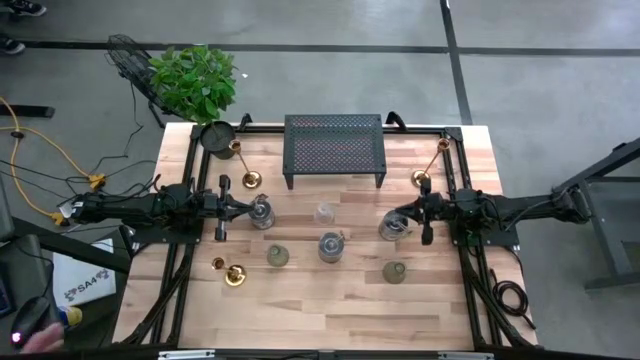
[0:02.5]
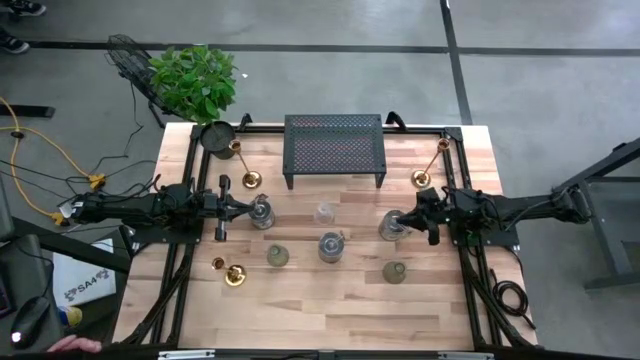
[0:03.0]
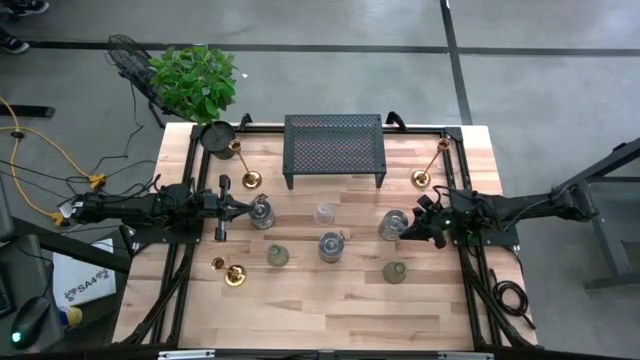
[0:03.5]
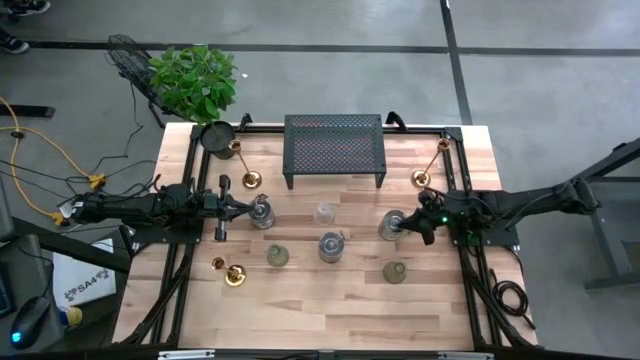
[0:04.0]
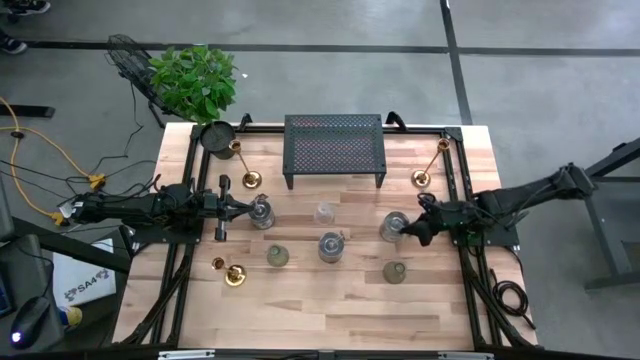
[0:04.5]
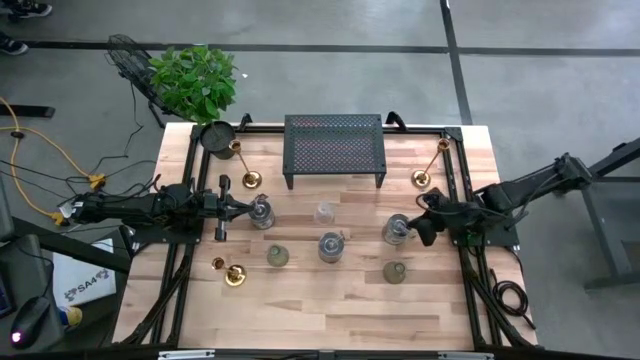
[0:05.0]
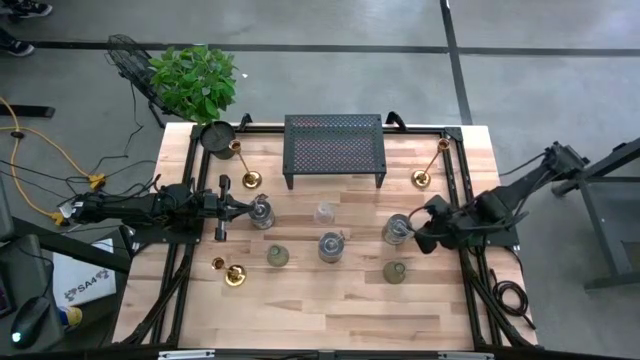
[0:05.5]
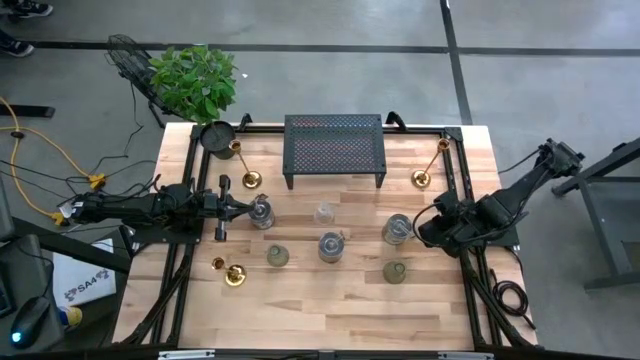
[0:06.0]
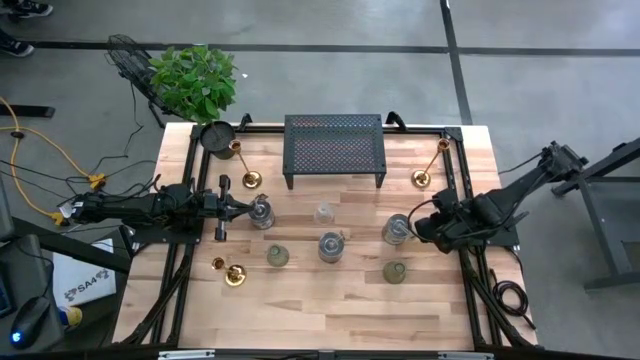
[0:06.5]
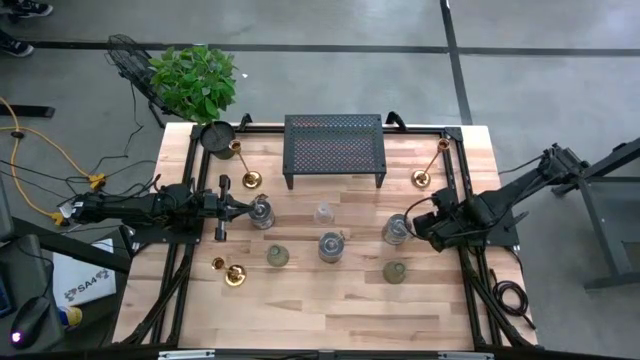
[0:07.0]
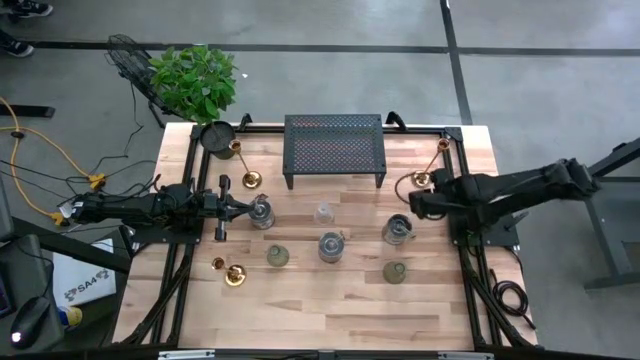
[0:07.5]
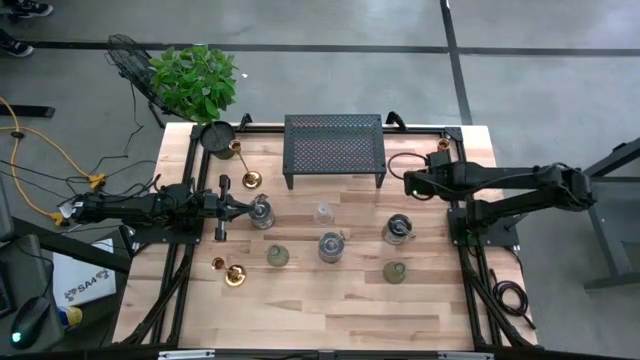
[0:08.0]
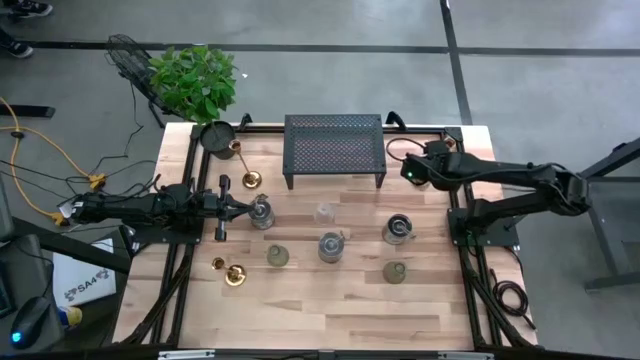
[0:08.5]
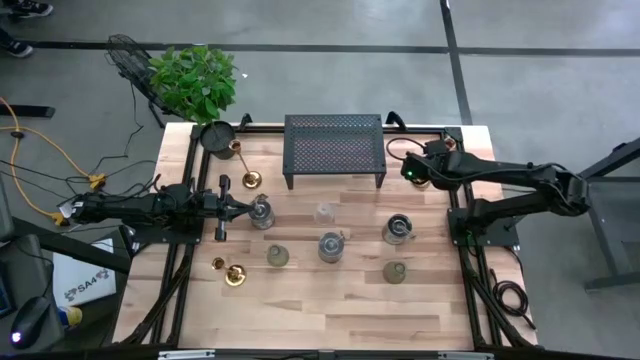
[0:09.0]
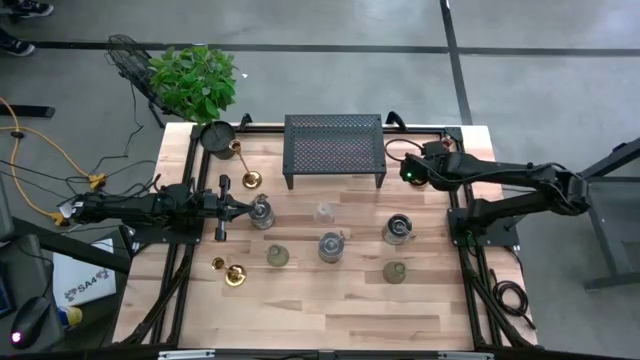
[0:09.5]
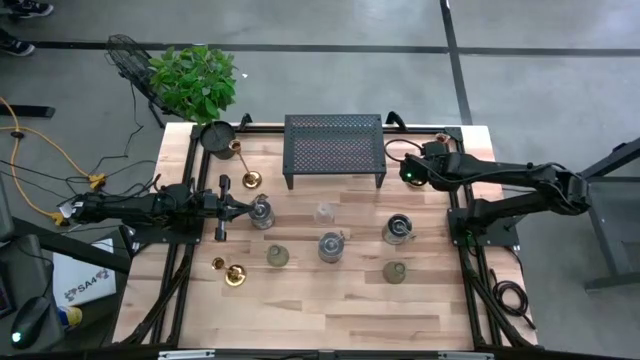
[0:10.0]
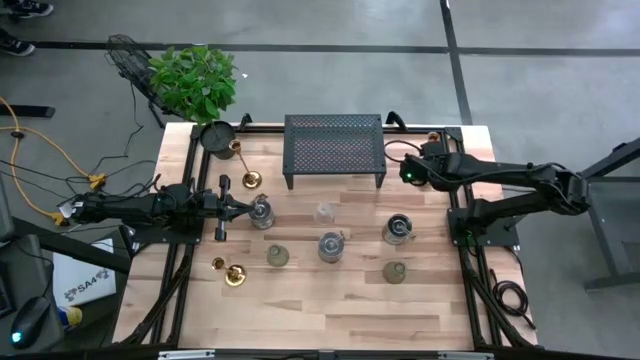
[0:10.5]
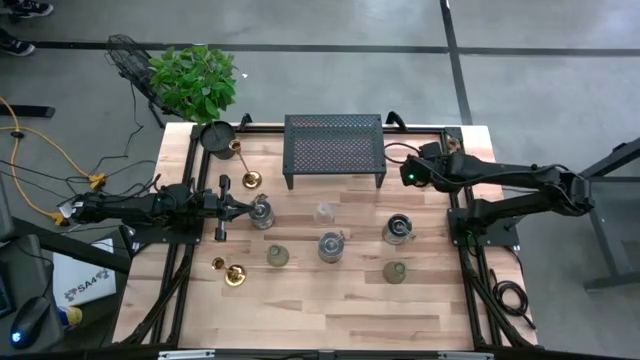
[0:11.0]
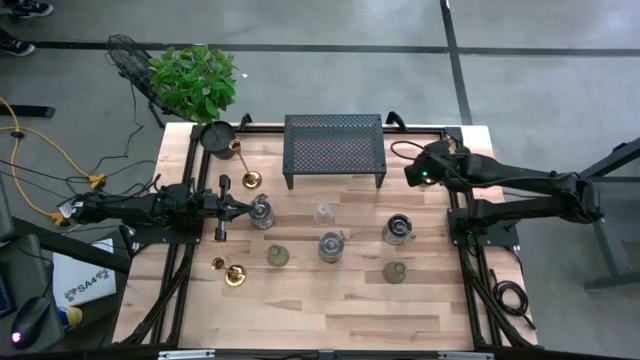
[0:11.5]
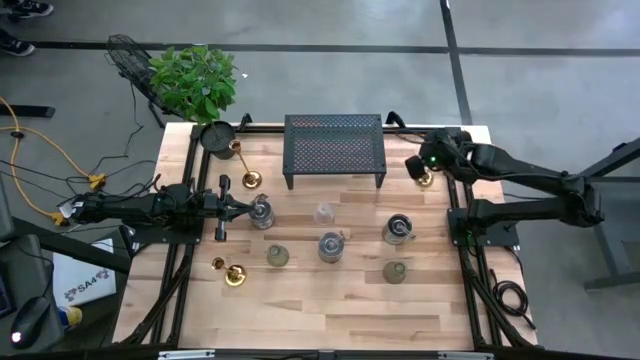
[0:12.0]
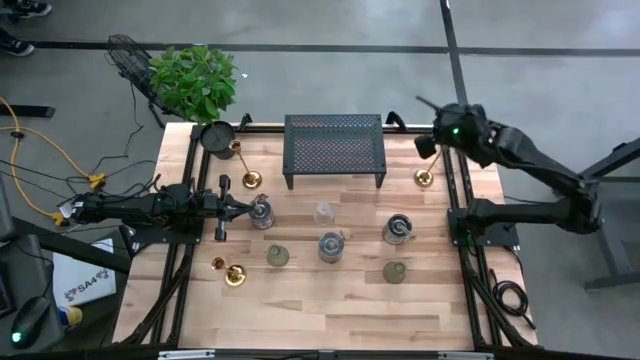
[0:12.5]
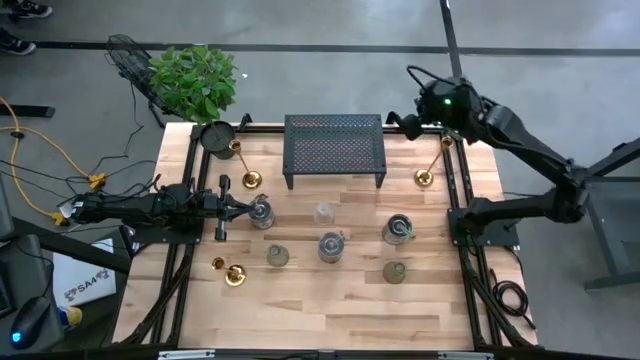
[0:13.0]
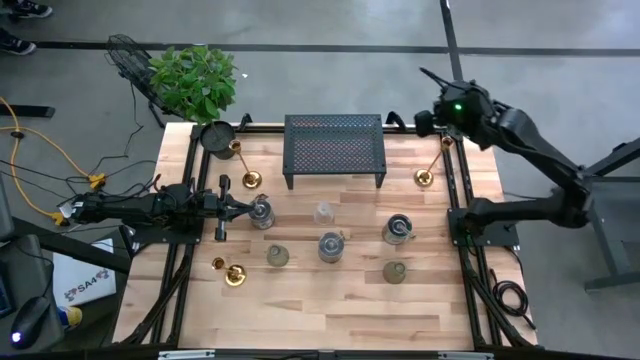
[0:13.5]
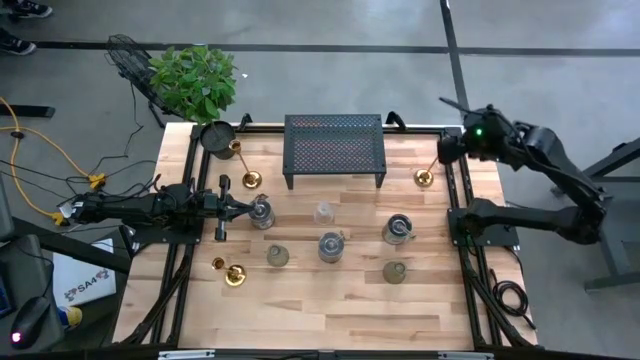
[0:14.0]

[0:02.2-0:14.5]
Task: Pick & Place candle stick holders
Put the top right gold candle holder on the shelf

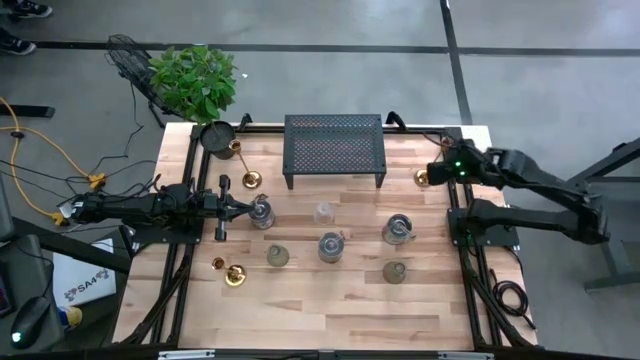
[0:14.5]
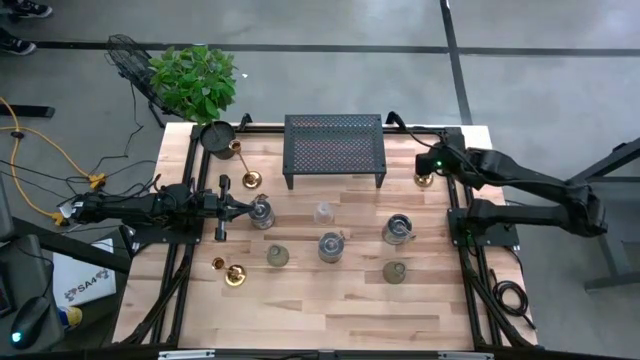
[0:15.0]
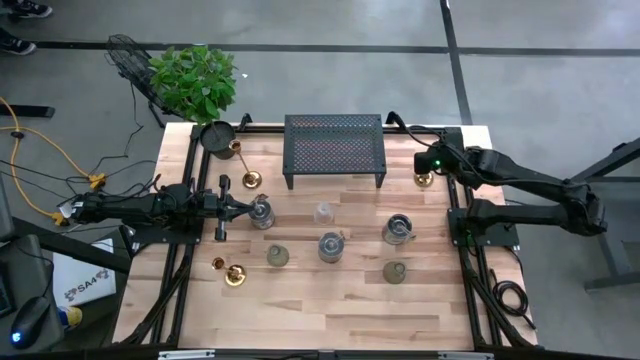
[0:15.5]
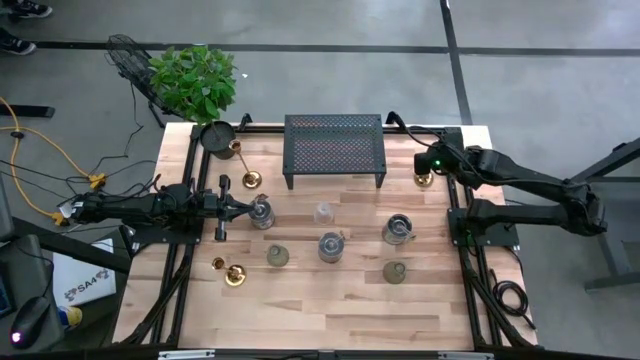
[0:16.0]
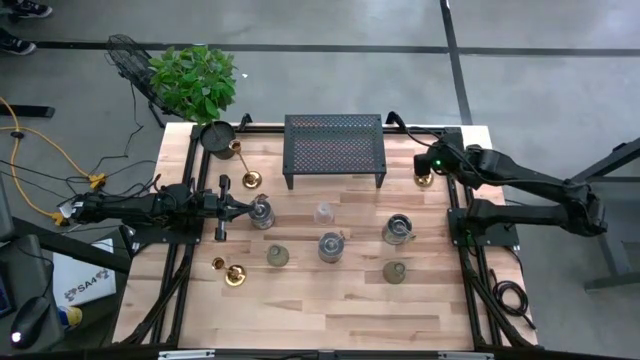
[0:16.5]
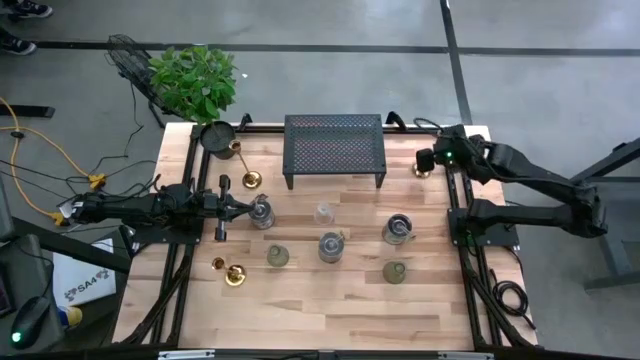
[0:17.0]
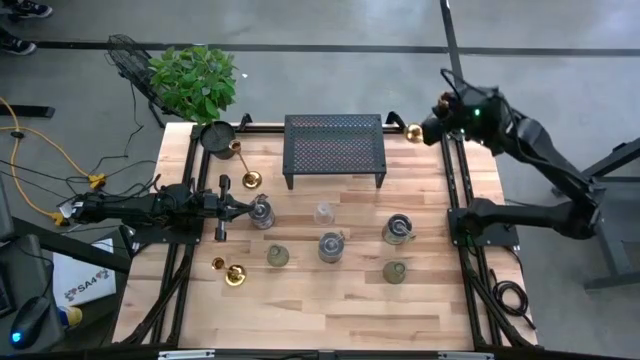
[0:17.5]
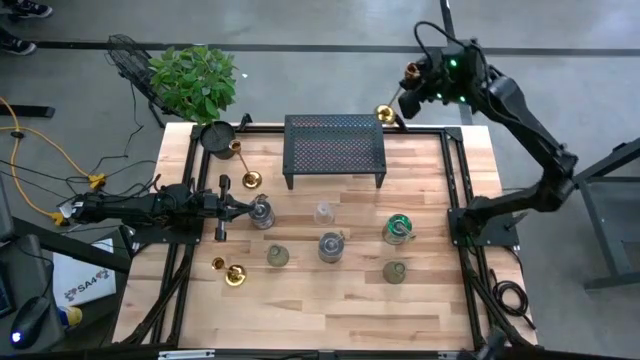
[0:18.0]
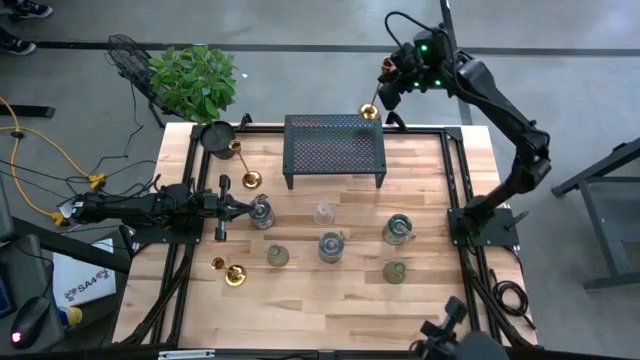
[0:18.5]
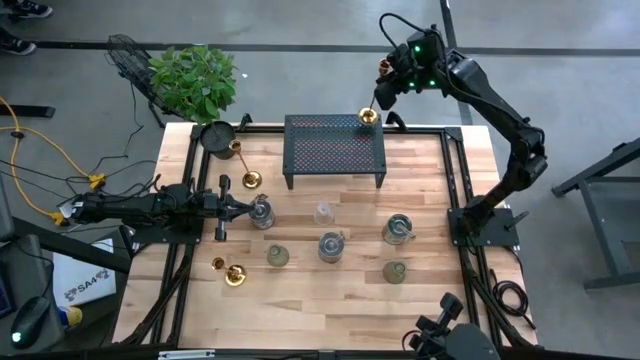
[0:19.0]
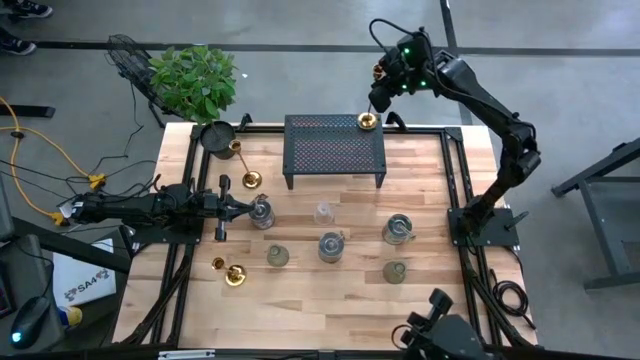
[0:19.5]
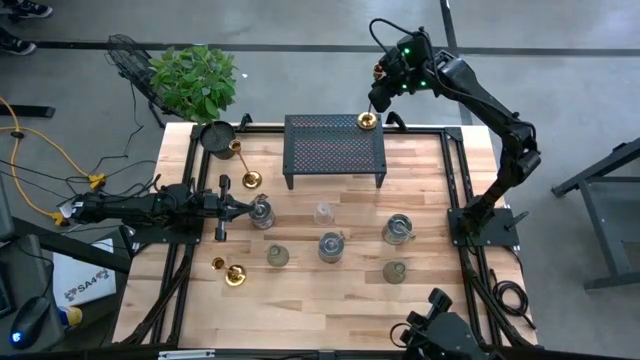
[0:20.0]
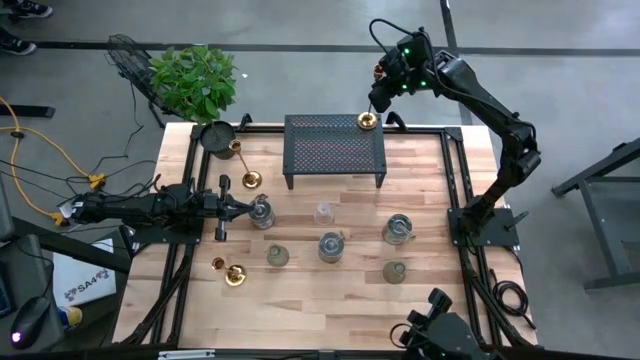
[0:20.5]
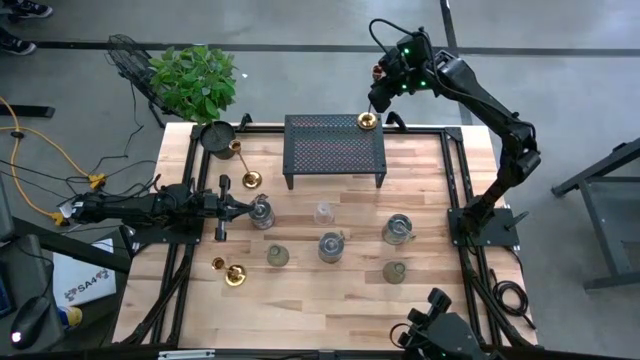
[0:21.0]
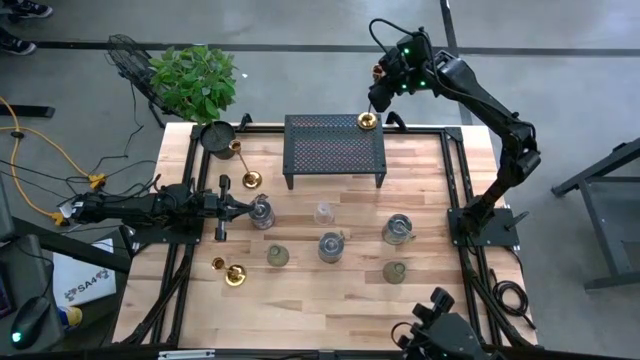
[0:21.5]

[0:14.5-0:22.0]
Put the top right gold candle holder on the shelf

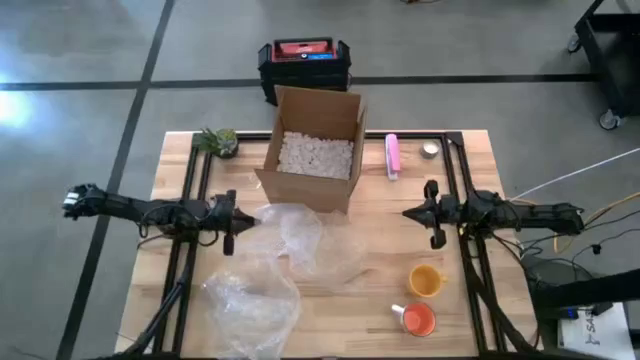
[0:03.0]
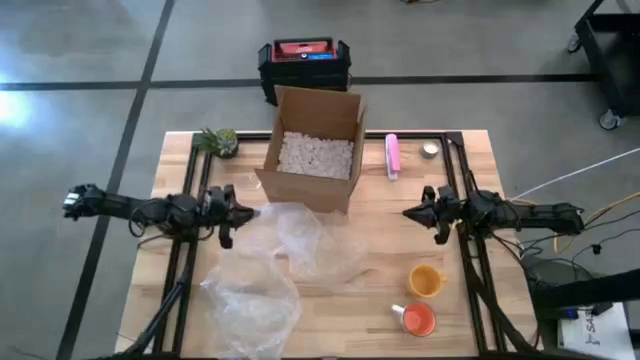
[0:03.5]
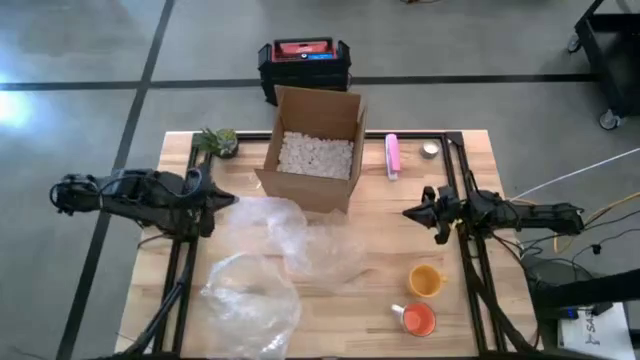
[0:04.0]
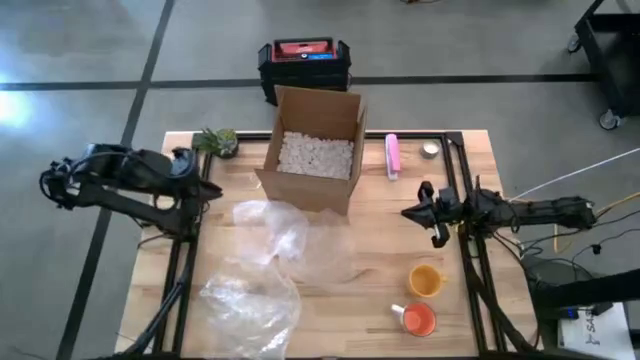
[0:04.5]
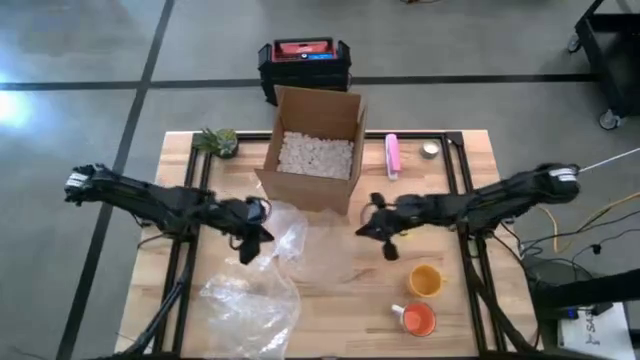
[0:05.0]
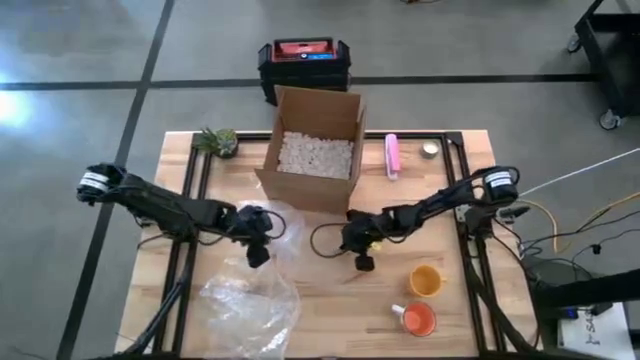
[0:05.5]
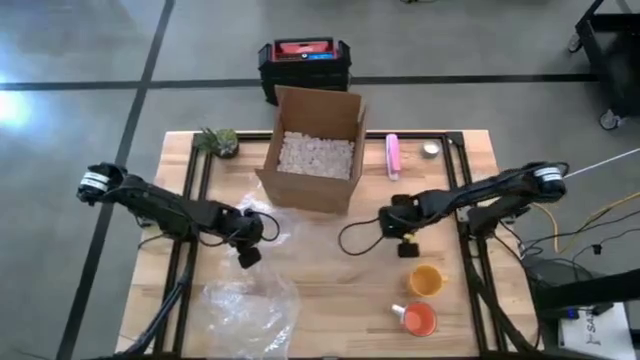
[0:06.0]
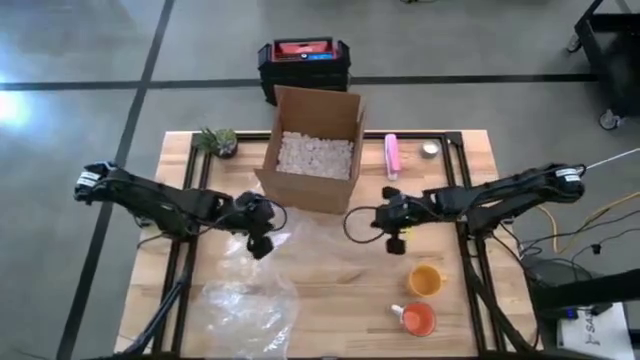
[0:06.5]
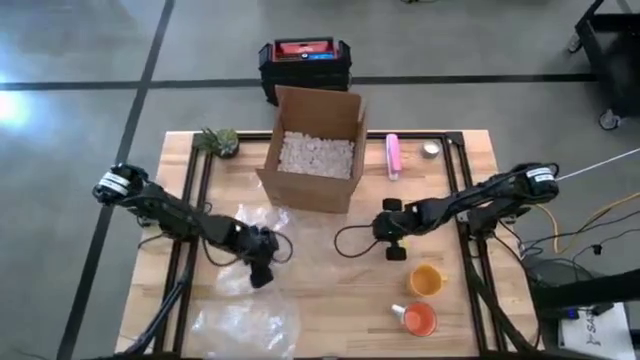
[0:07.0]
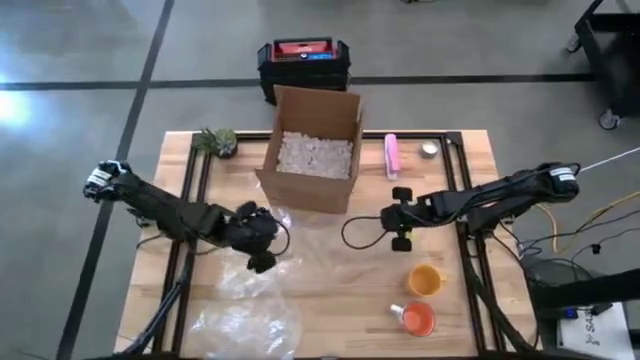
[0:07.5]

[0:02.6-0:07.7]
Task: wrap mug
Prepare the top transparent bubble wrap
